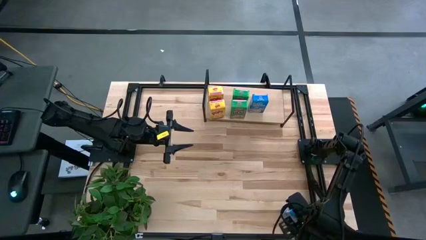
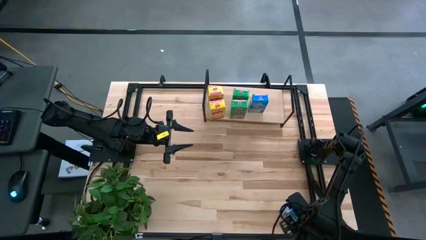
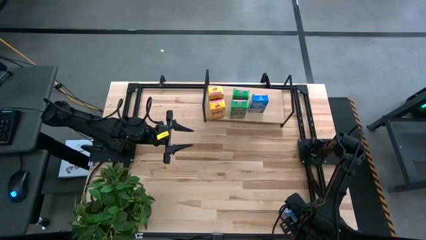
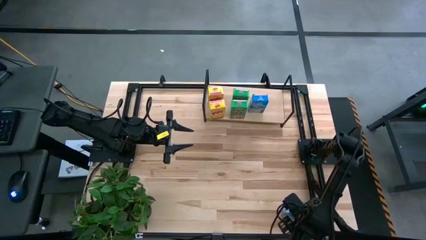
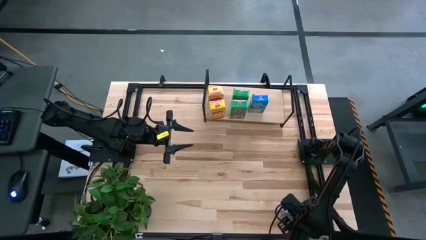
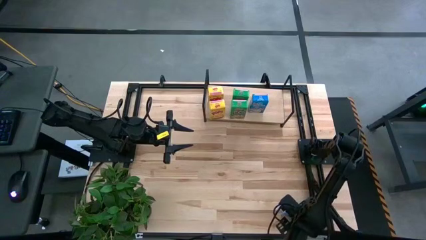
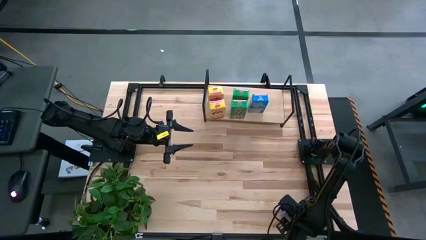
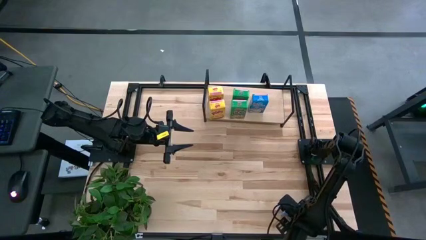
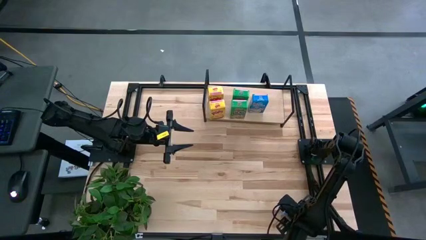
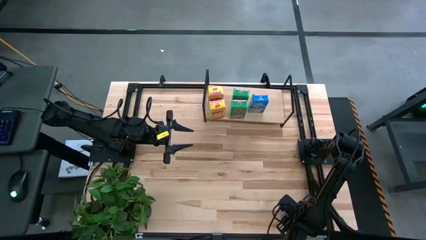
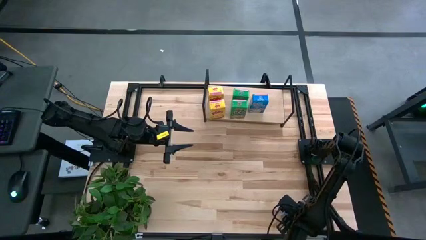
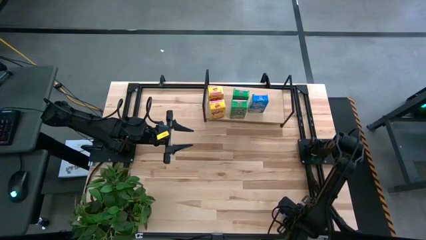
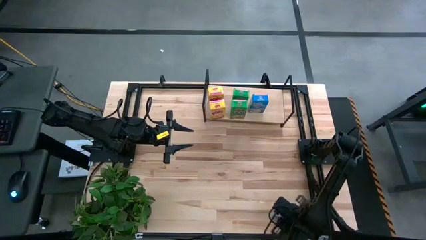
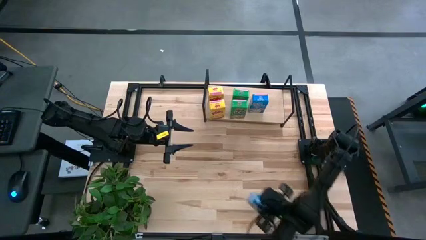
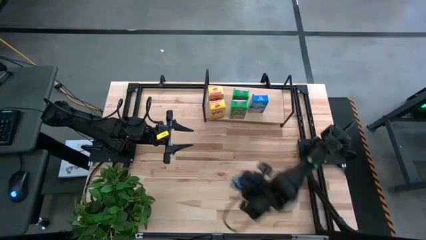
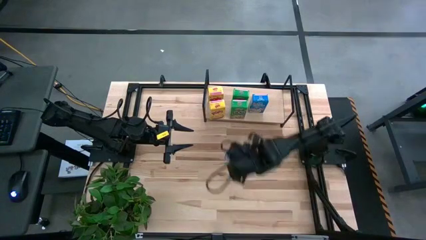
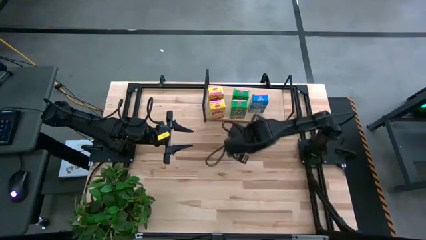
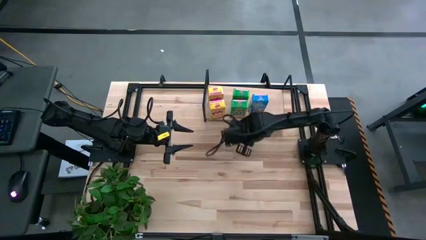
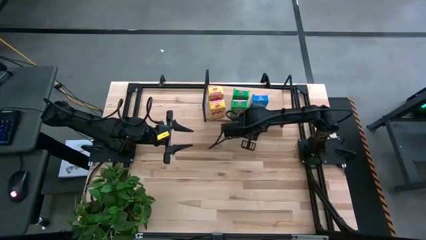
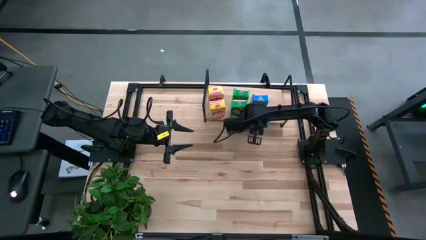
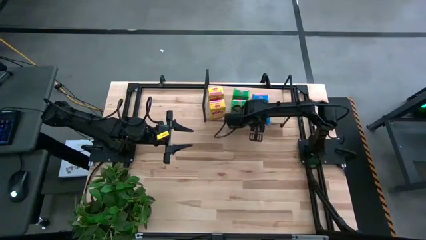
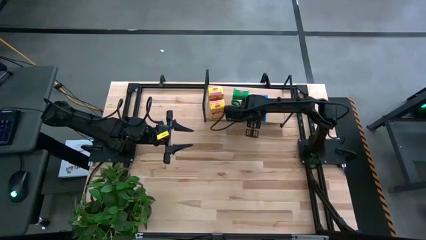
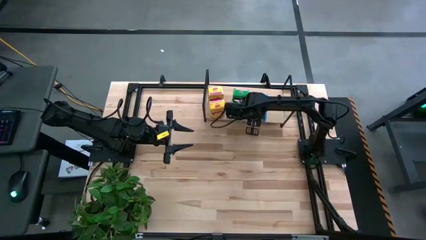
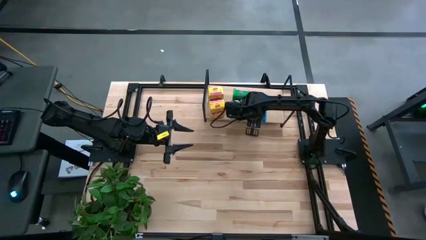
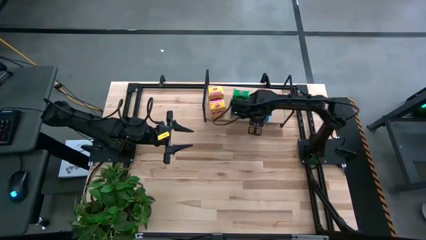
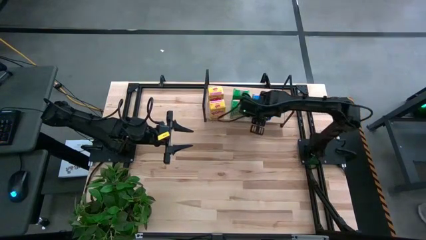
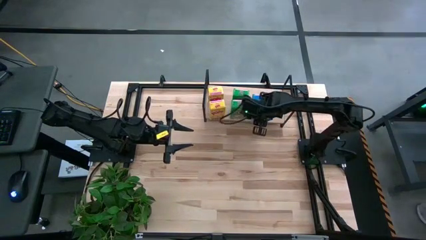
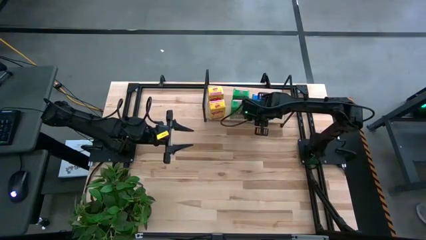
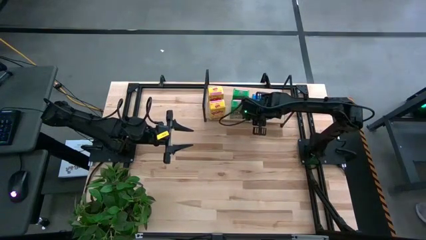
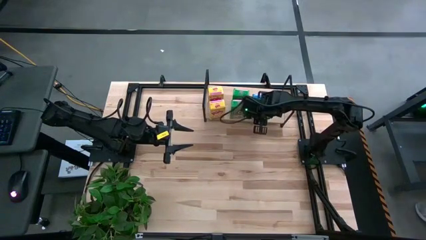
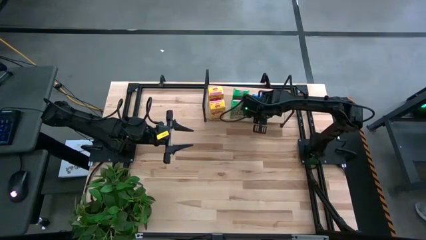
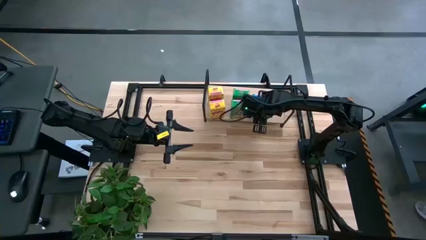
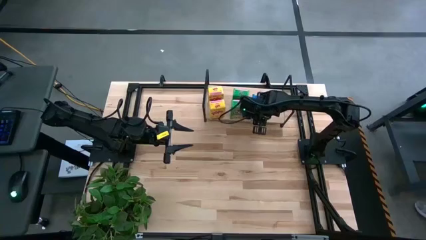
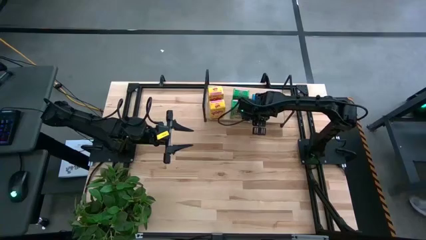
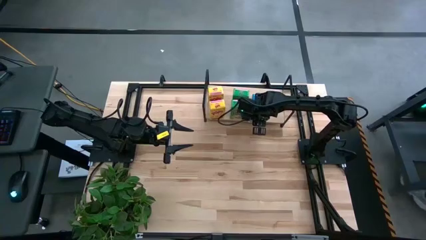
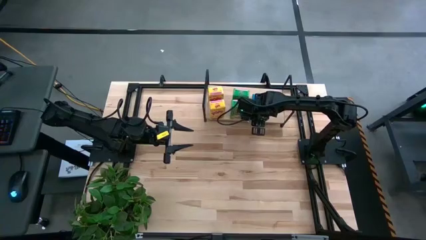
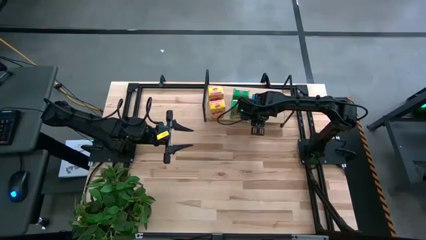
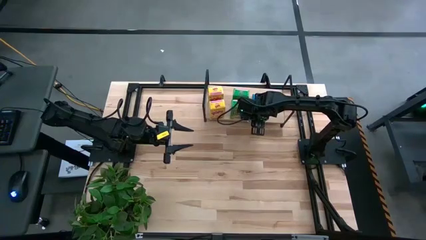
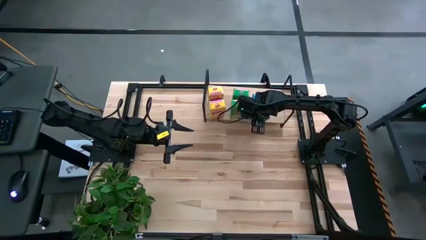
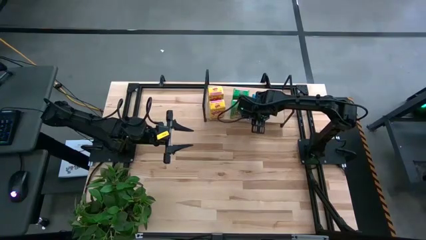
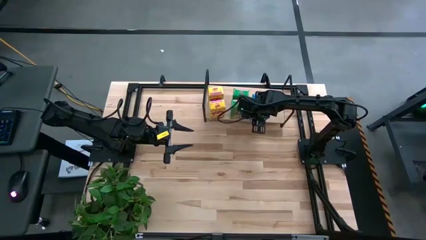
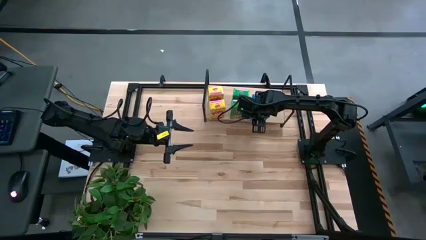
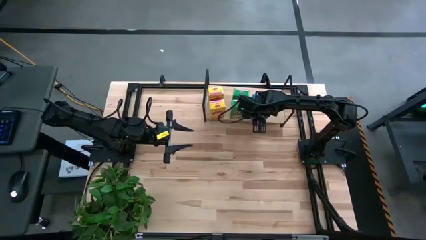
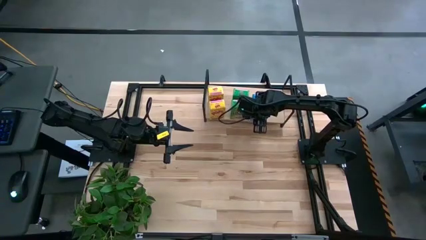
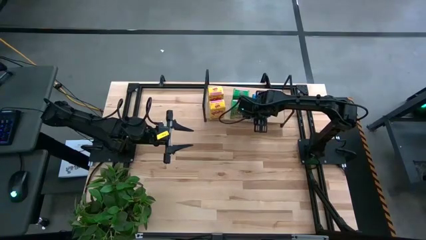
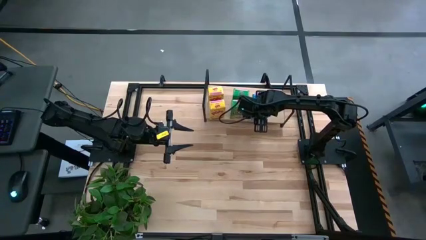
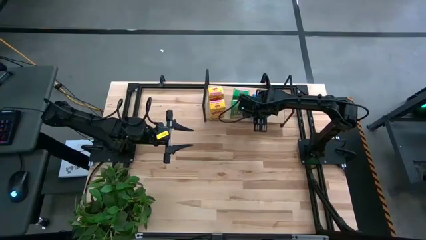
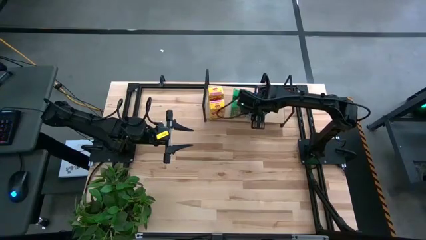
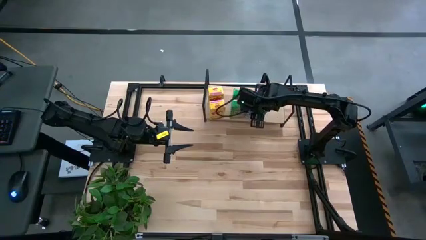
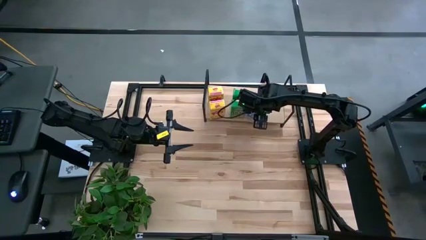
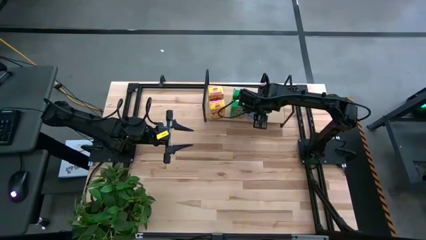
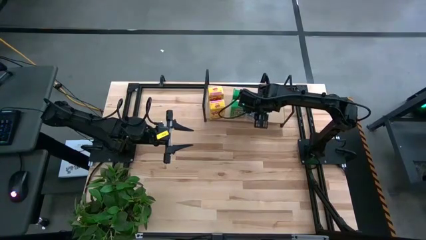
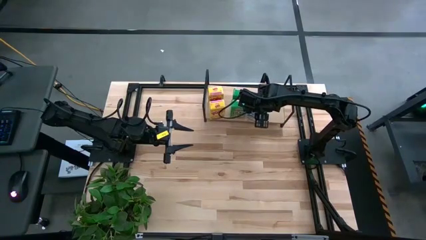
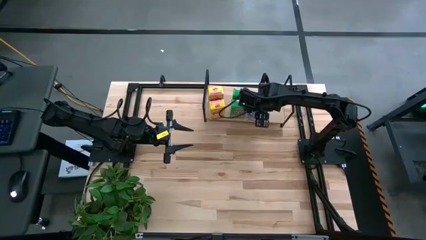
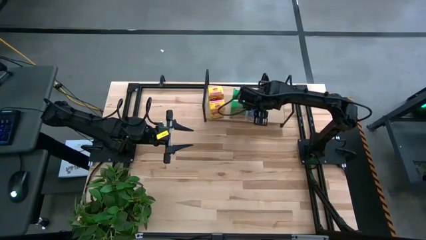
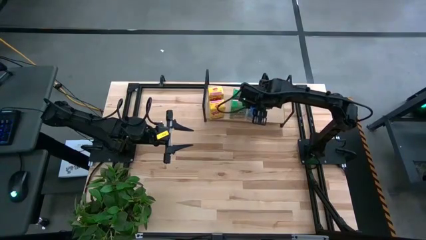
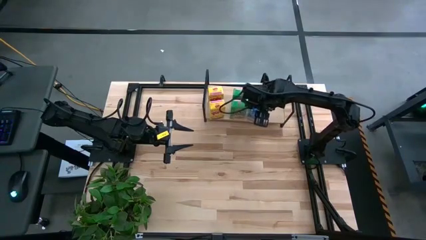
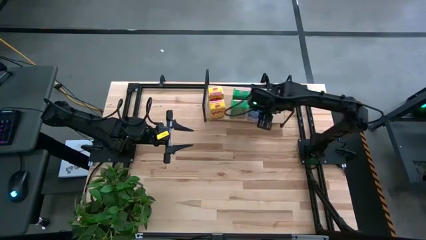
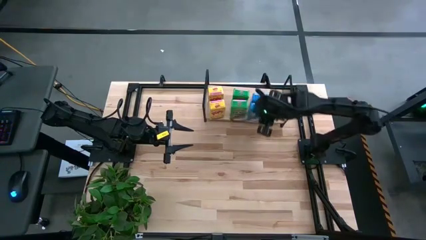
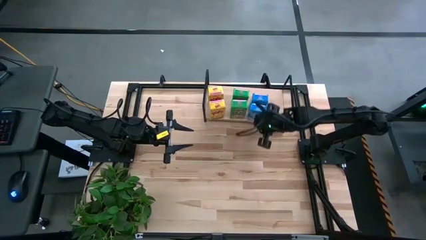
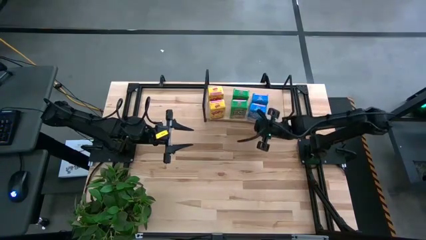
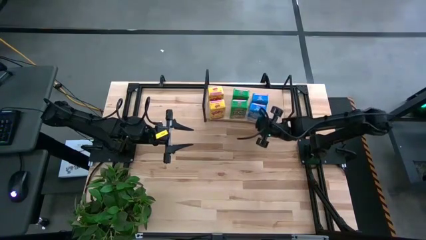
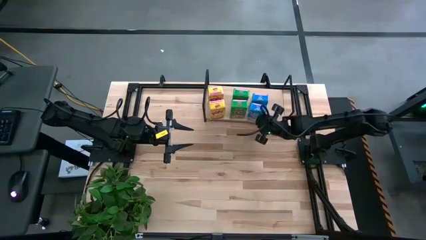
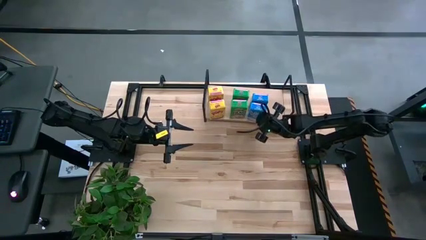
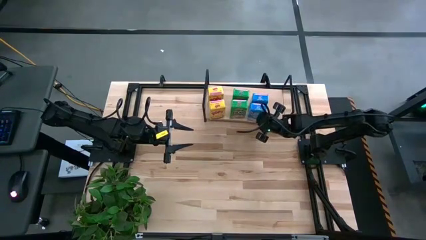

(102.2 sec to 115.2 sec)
Task: Stack cereal on shelf
Put the blue cereal box on the shelf
